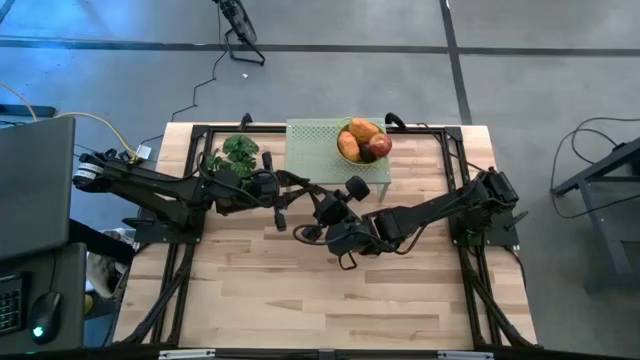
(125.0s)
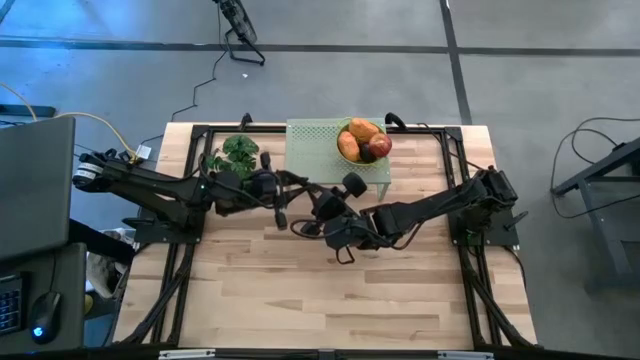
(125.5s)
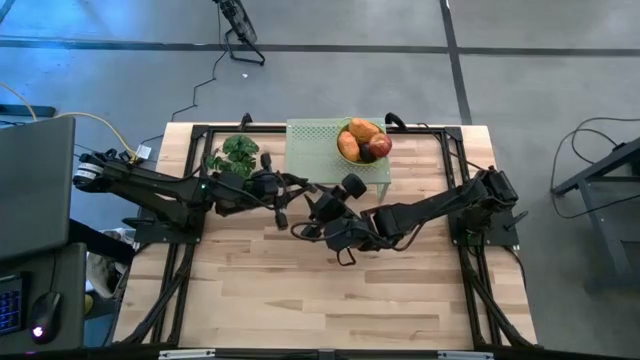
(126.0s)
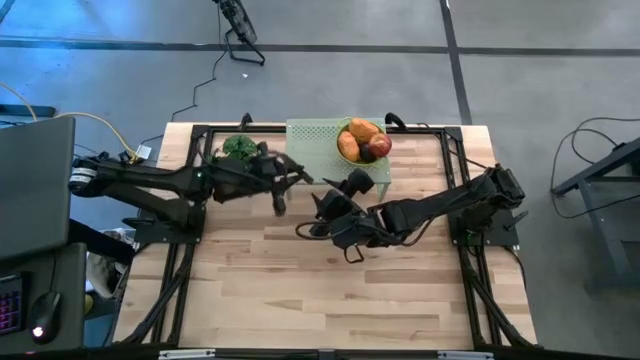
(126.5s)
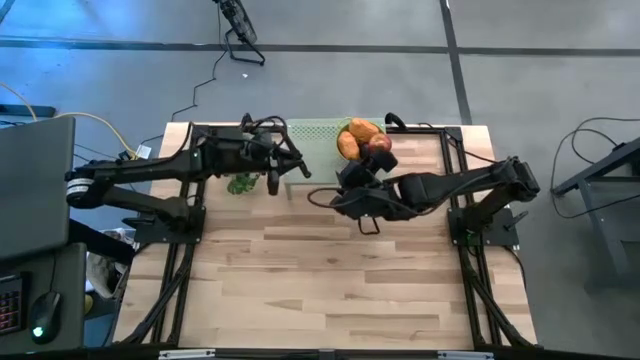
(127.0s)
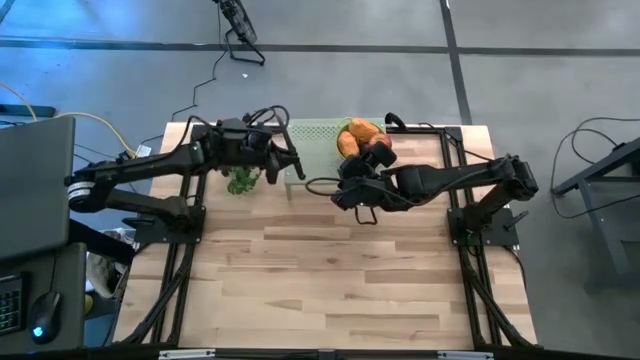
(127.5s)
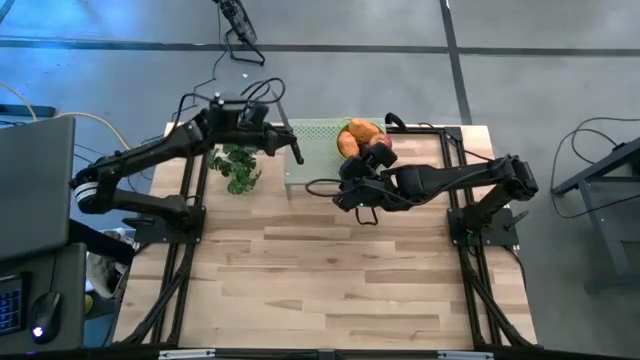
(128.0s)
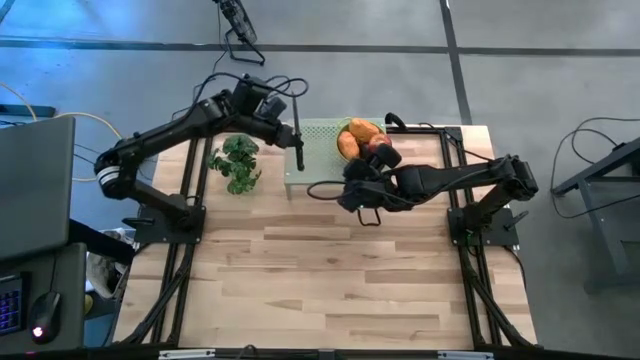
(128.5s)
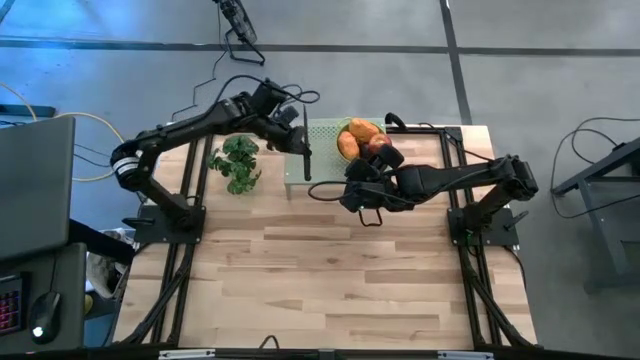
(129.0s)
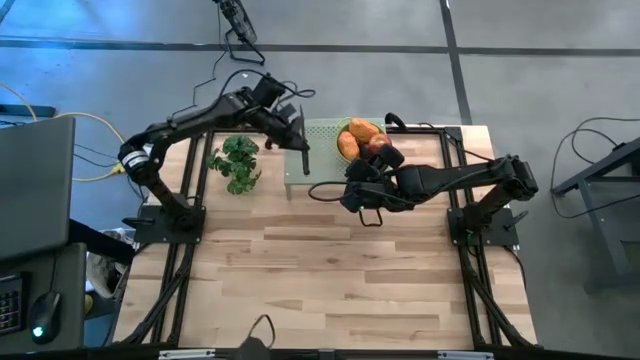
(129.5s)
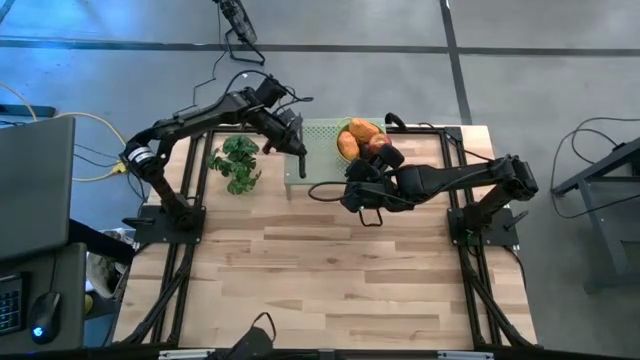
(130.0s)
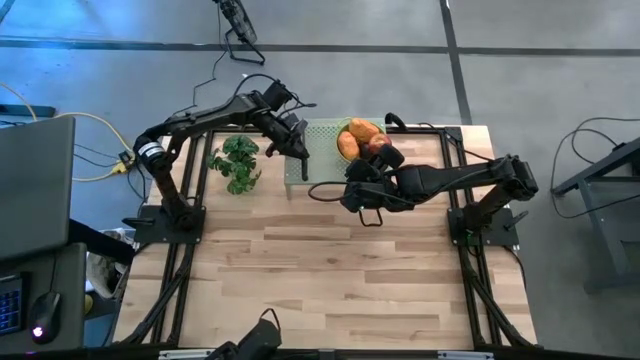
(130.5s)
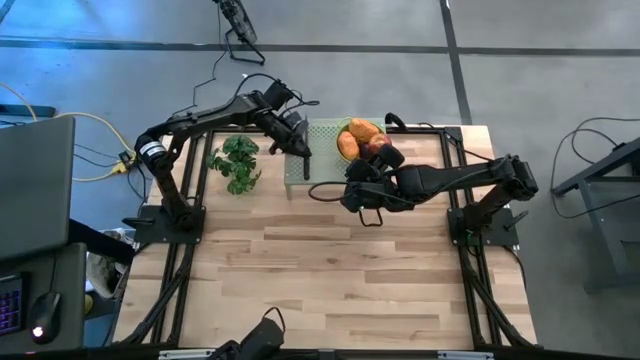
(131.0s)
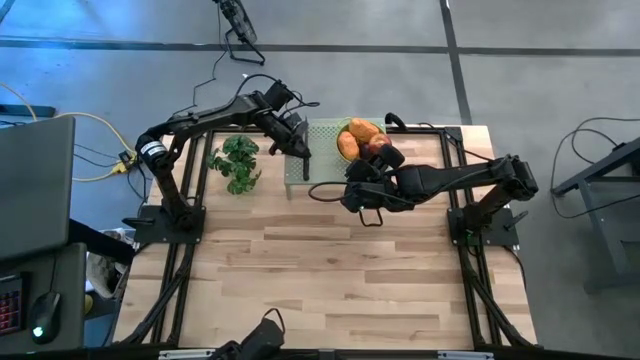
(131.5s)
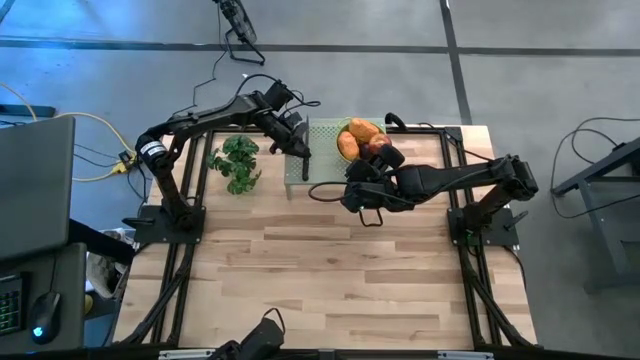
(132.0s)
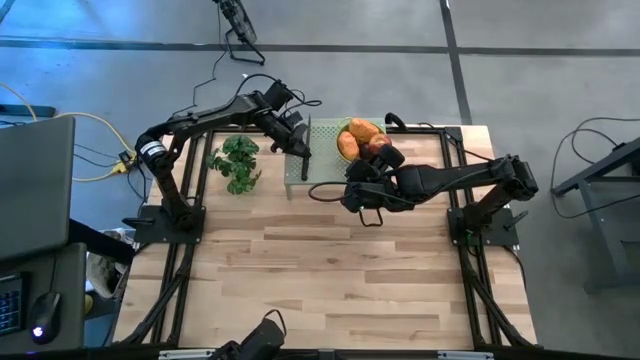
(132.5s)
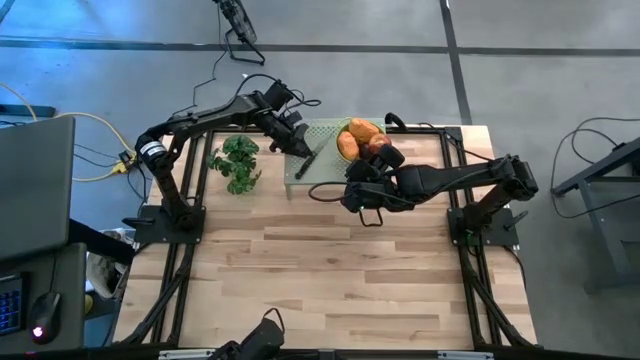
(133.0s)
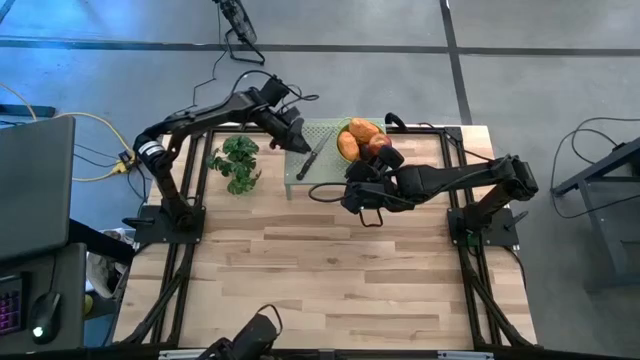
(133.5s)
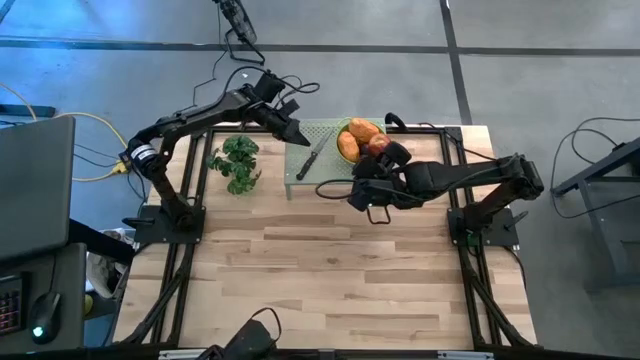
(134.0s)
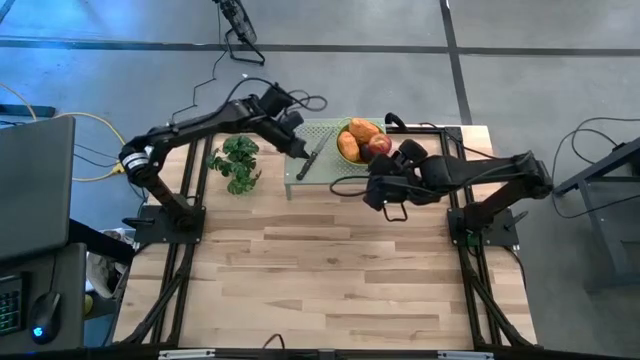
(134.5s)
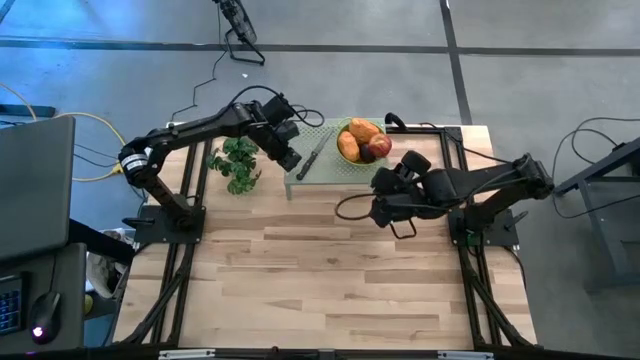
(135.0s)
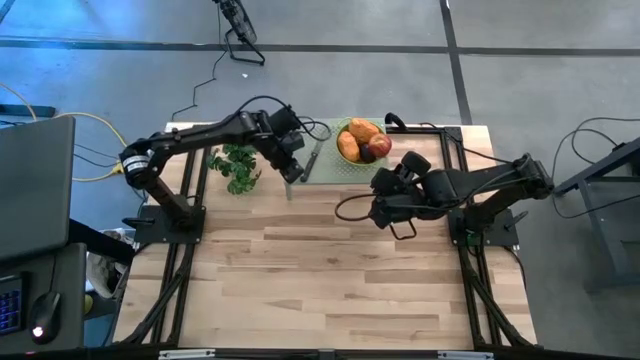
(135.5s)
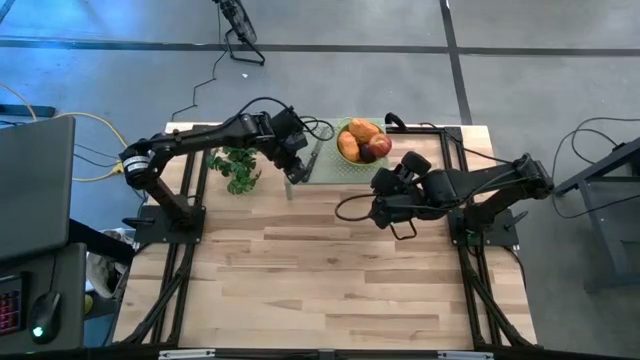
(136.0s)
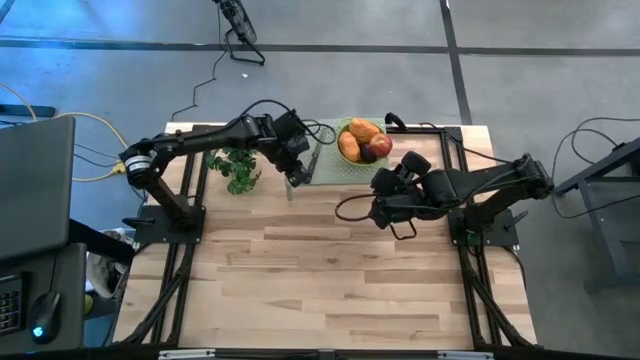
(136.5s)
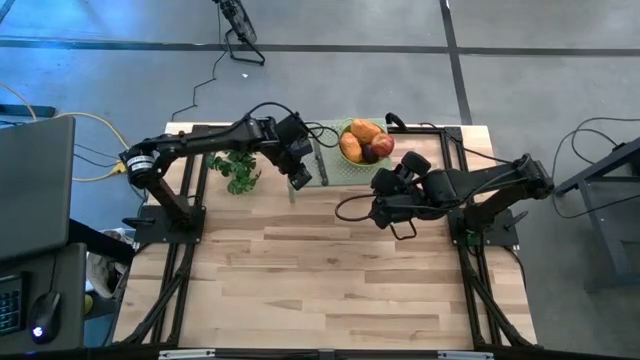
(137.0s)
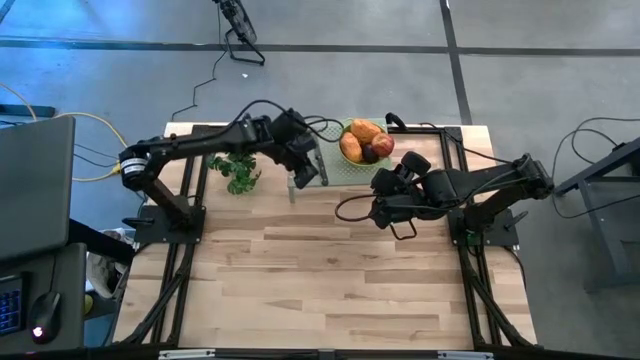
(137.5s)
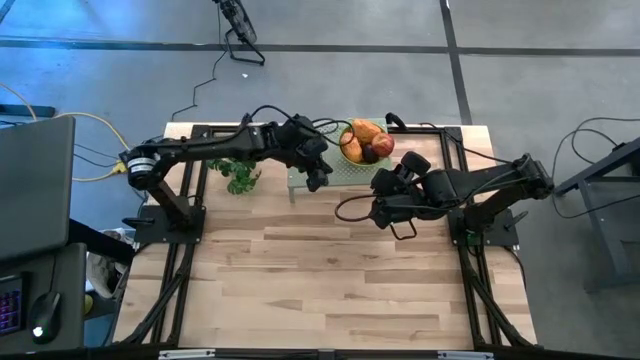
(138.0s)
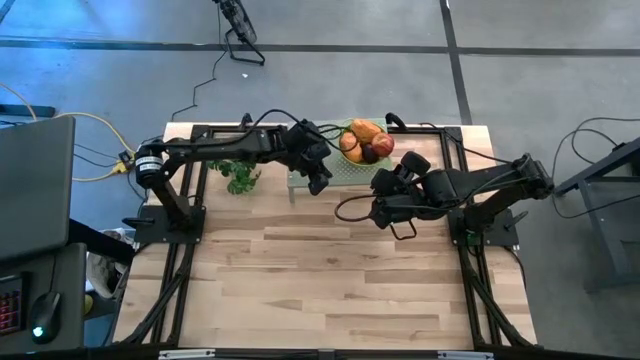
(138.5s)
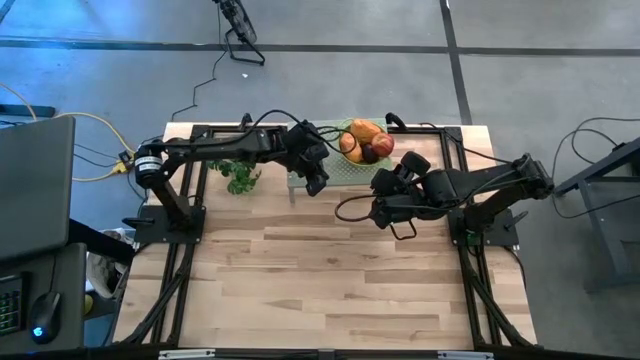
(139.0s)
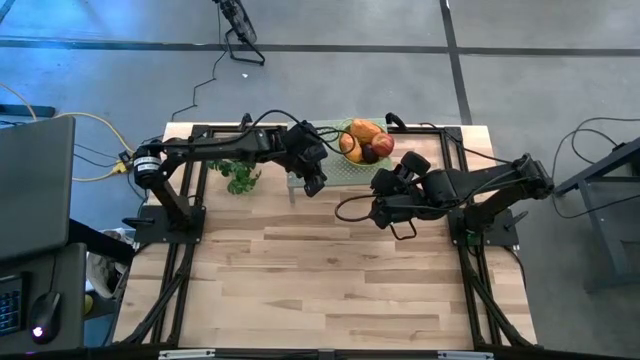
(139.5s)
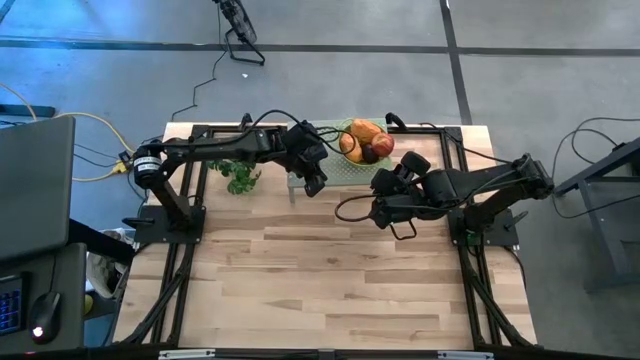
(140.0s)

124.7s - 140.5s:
Task: Pick & Place Fruit
Put the knife on the top shelf to the left of the green strainer bowl

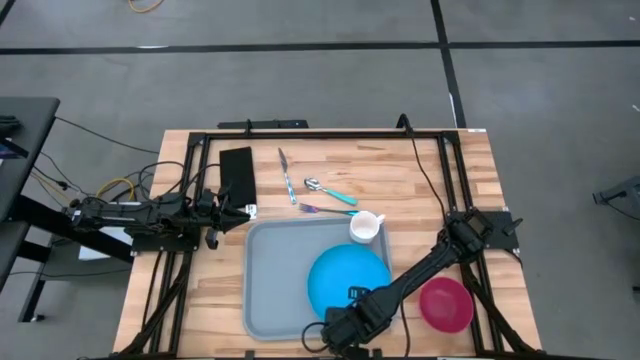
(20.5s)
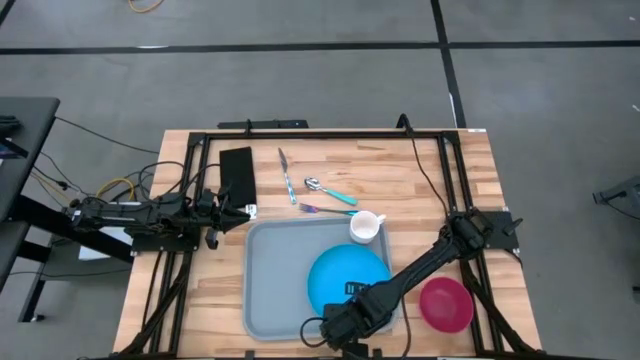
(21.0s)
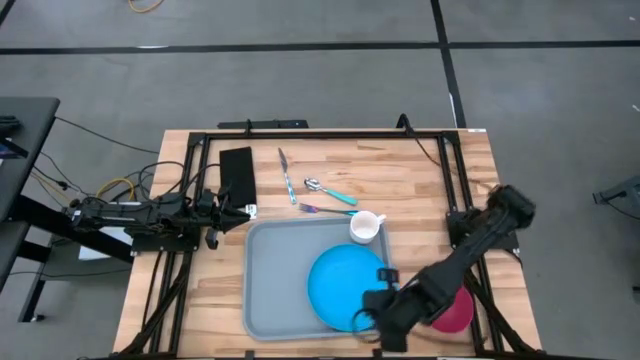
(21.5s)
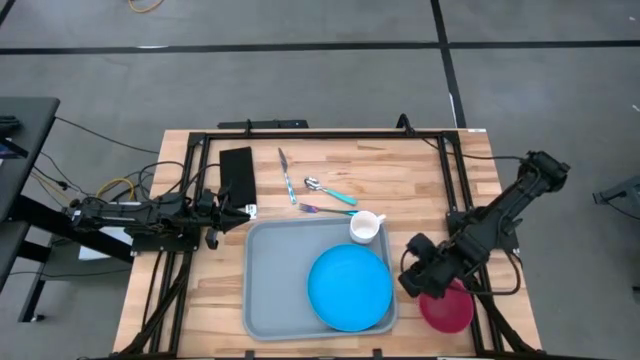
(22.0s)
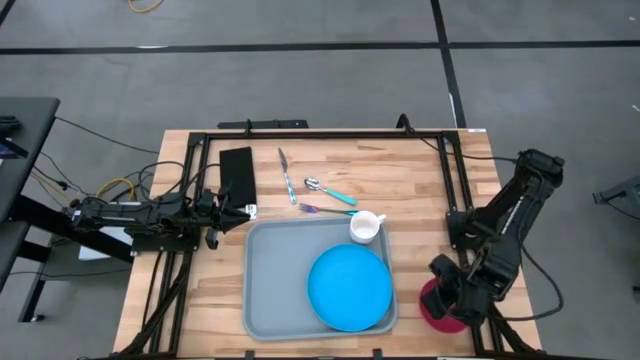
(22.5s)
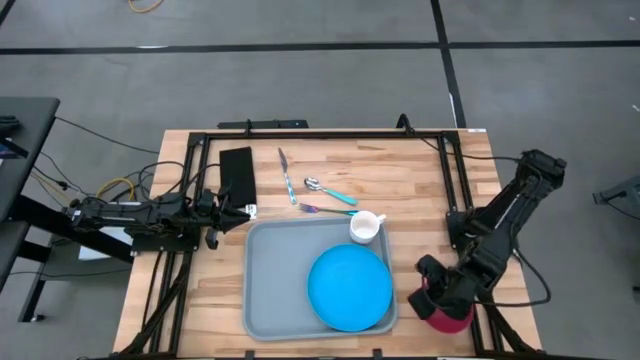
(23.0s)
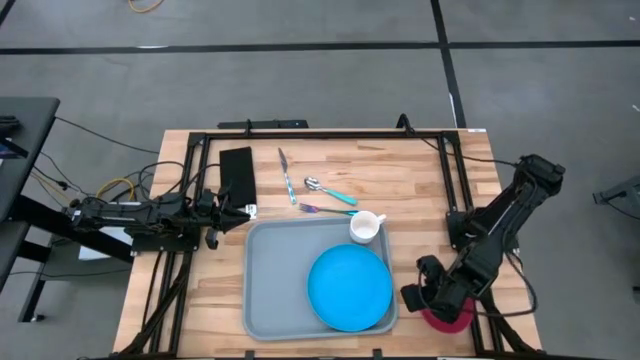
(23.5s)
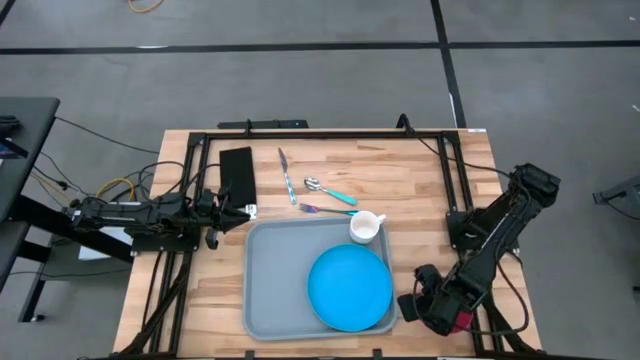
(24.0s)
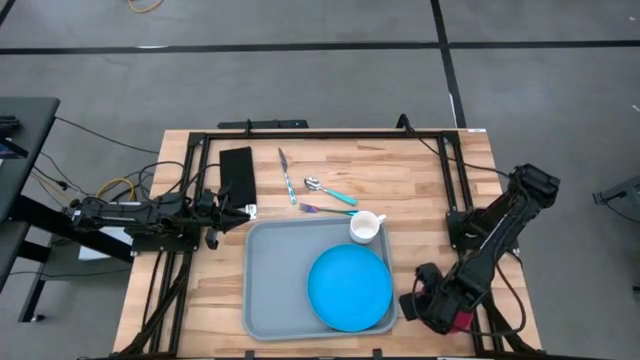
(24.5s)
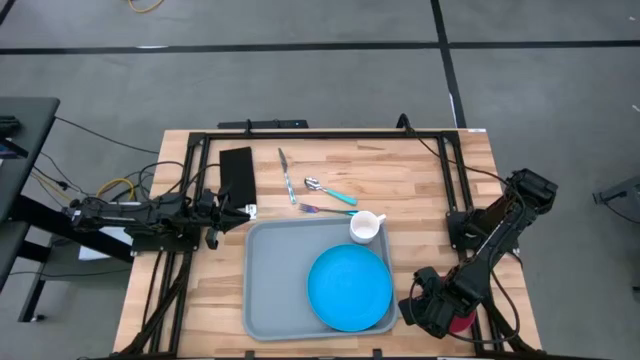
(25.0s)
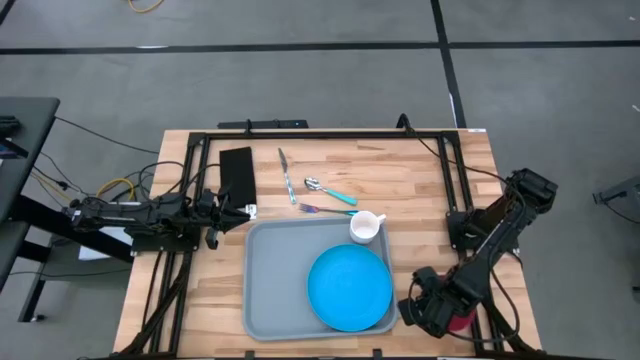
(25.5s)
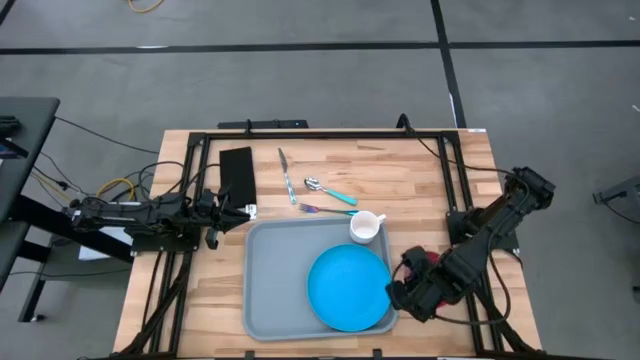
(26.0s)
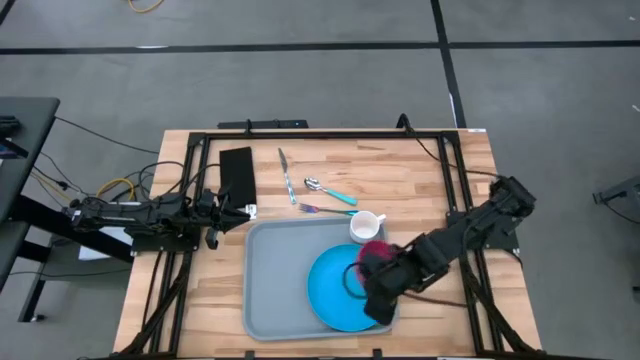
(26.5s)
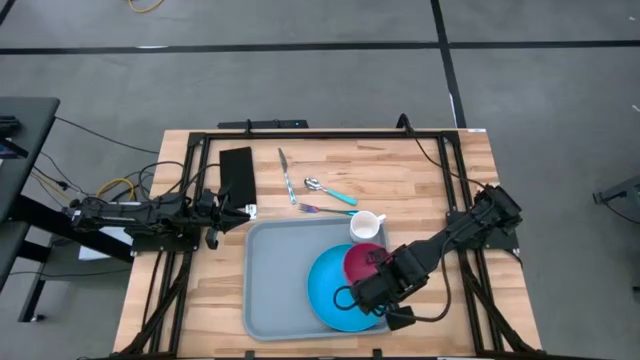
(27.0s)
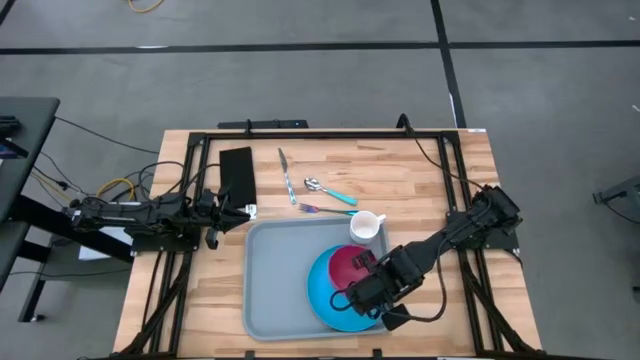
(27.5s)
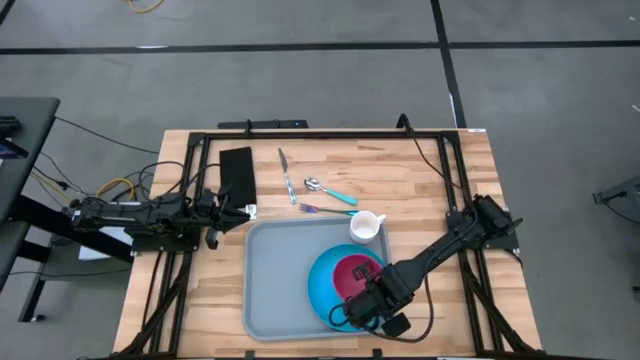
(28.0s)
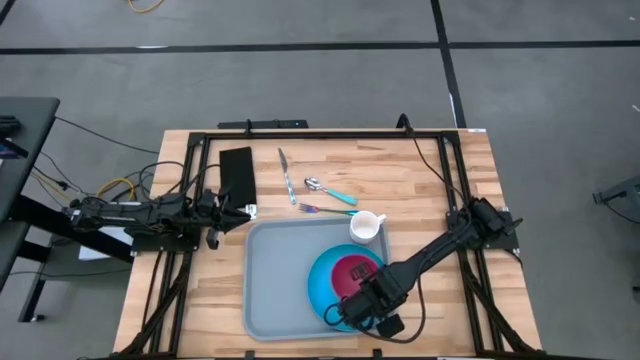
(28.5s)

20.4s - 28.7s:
Task: Set up tray
Put the pink bowl on the blue plate
